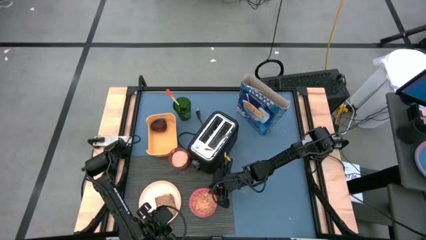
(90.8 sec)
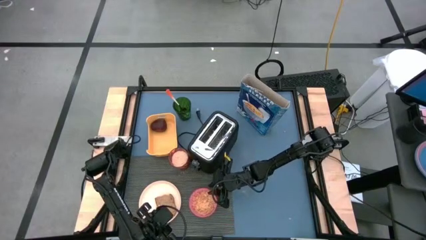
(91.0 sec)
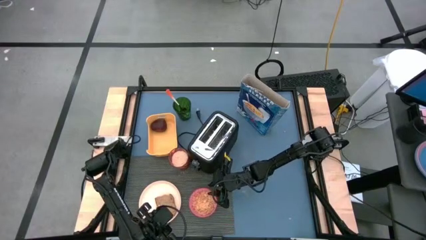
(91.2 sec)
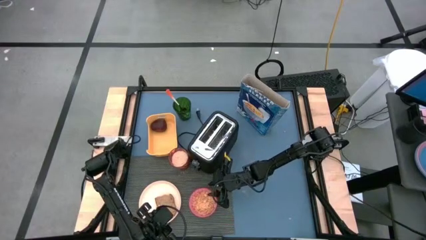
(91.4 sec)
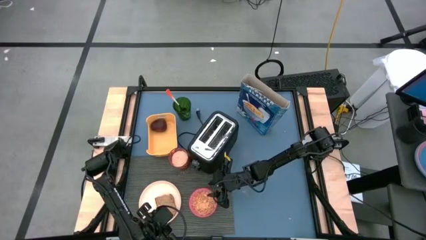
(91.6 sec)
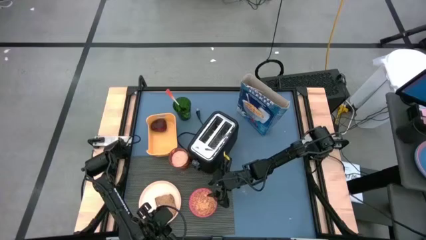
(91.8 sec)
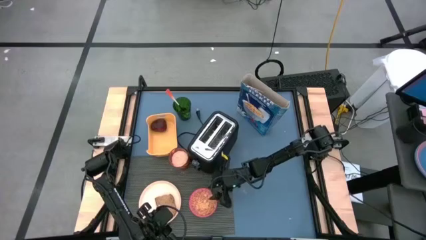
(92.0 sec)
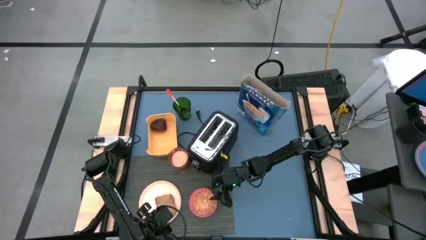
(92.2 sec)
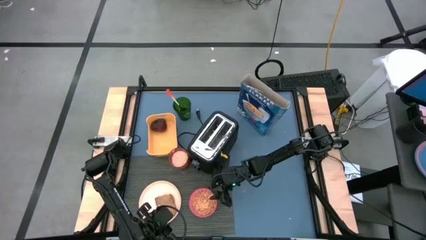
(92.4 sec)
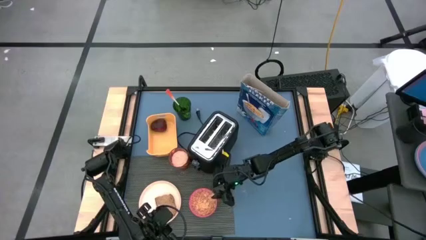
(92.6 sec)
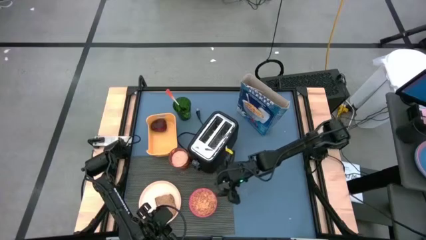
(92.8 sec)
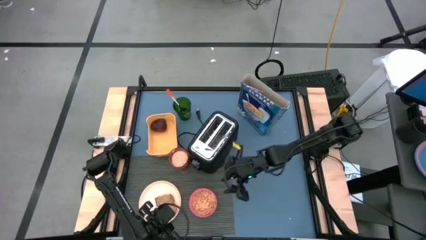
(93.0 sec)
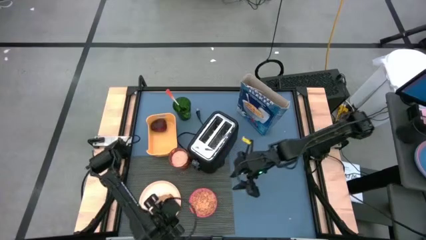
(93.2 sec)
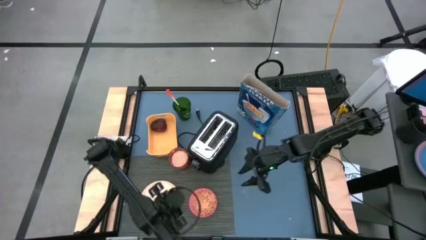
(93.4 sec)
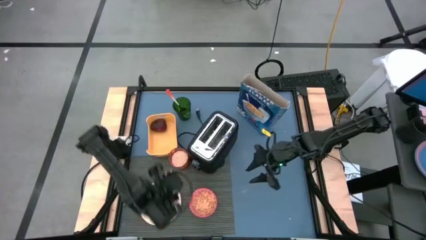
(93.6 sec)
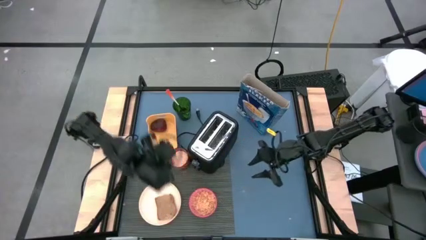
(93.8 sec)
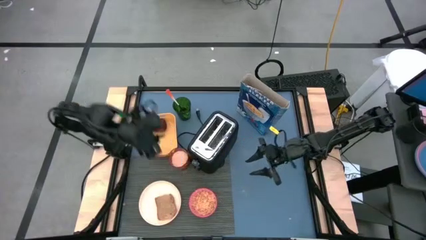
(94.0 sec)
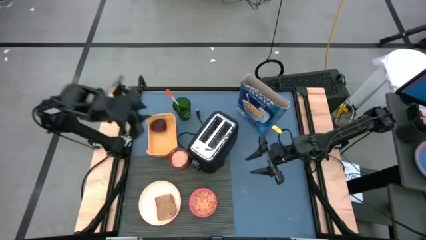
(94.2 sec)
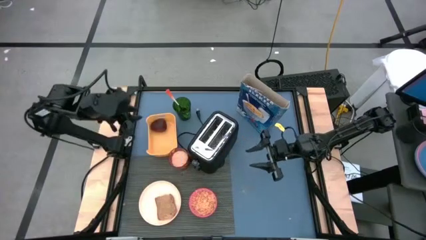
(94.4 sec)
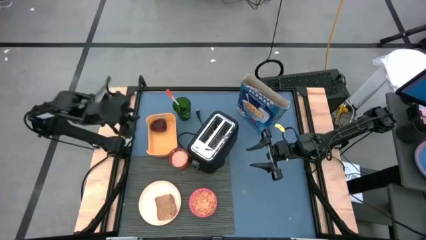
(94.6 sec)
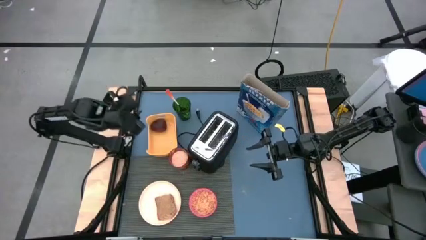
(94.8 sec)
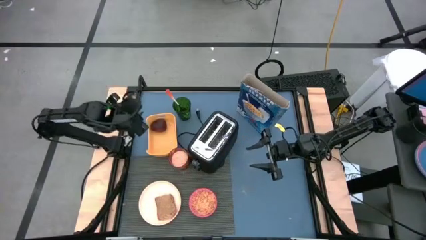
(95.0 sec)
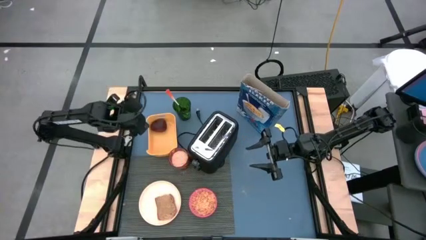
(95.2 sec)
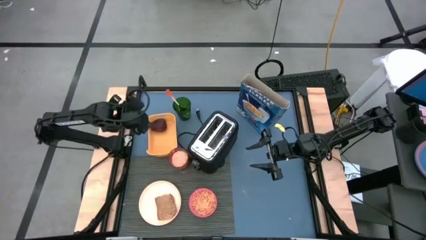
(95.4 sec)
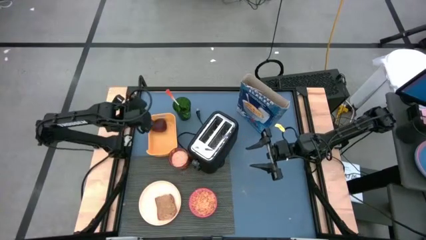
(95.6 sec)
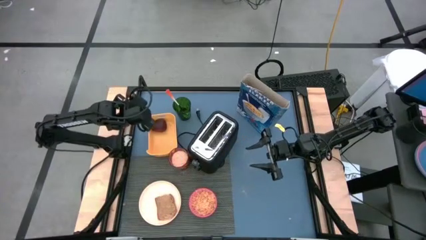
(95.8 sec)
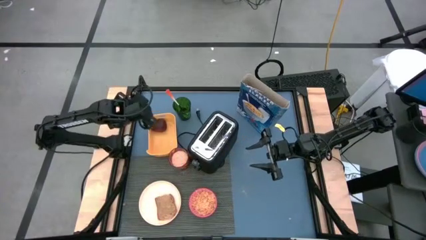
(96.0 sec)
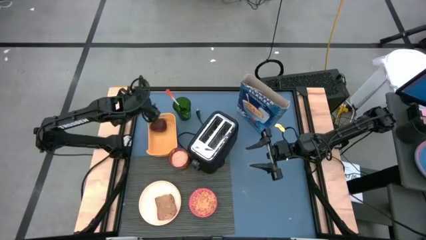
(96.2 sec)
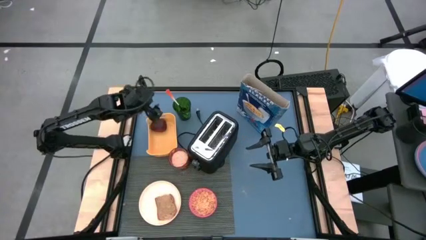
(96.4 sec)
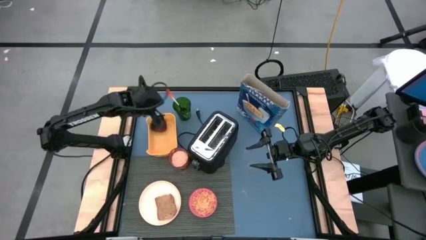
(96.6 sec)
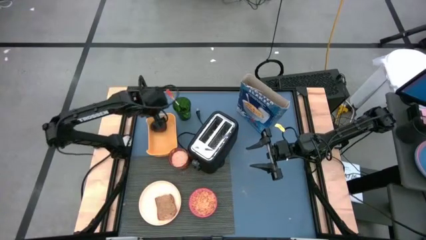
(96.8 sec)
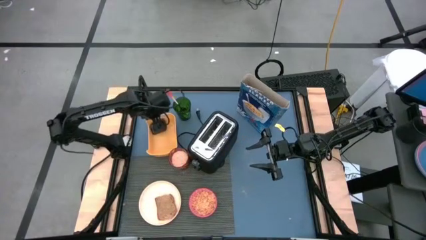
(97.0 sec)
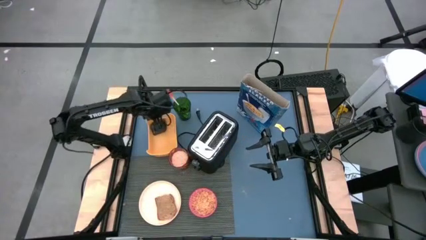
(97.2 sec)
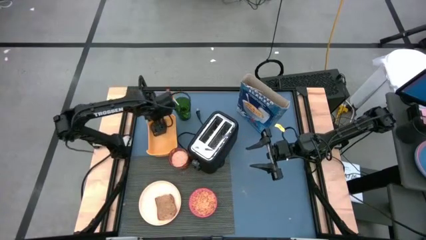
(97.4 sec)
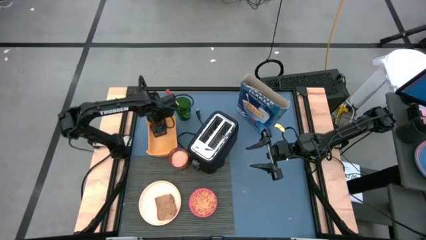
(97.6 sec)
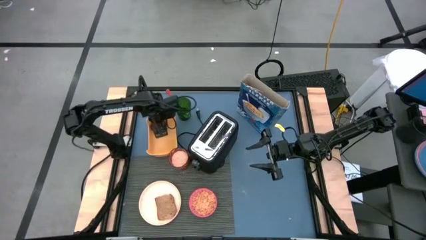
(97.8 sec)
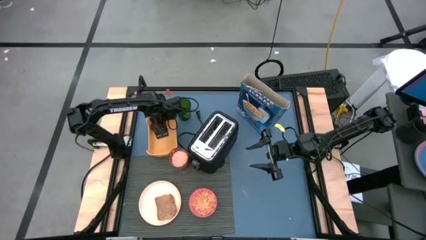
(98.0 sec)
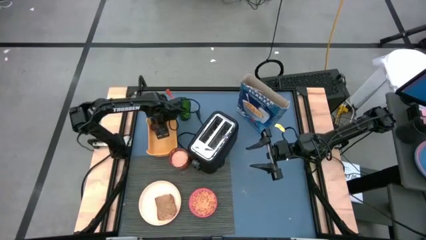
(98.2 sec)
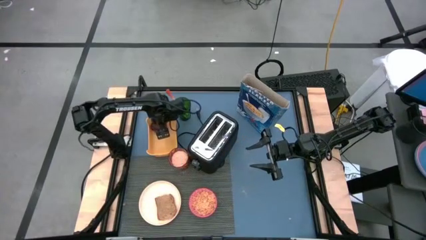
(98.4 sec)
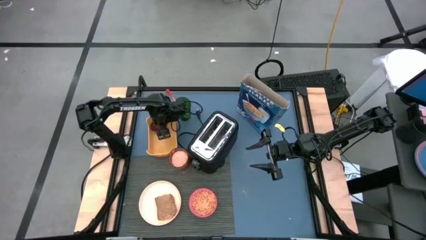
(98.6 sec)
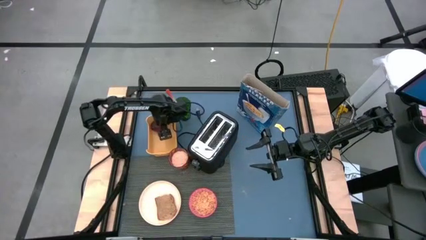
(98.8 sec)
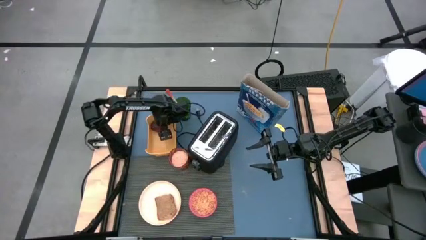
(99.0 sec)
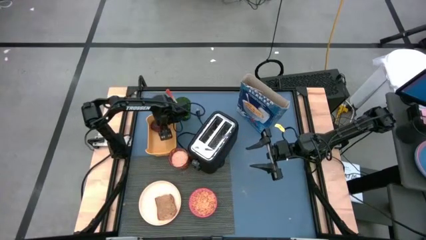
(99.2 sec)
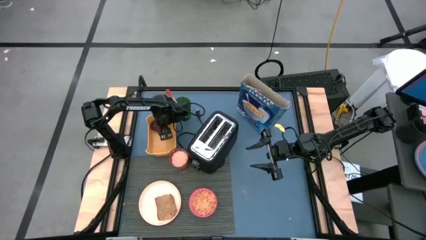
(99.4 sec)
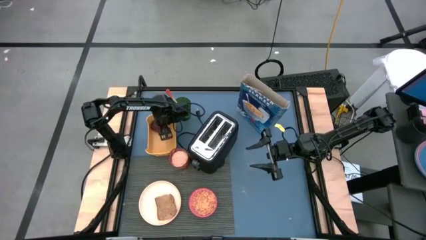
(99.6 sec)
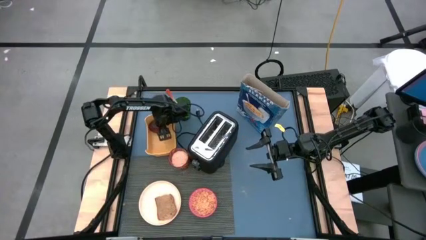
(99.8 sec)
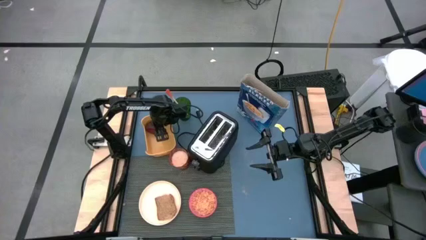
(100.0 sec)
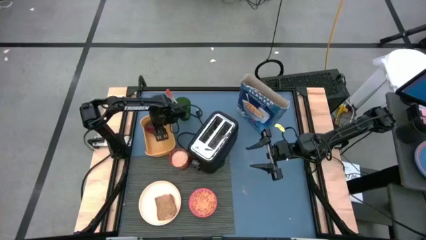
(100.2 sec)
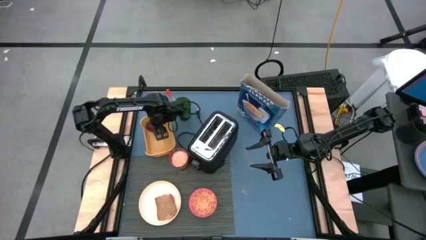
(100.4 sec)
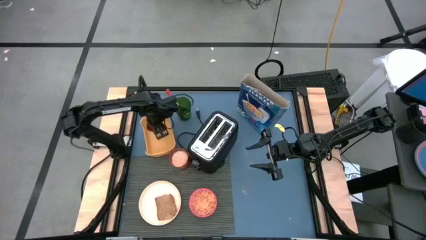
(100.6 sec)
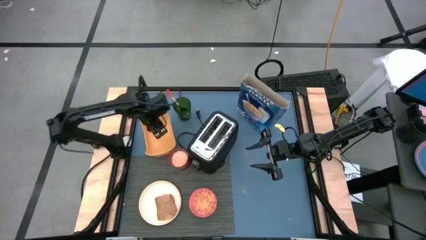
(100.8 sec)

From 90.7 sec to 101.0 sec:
Task: Arrange a breakfast setting
Put the red apple on the gray tablemat to the top of the light orange plate

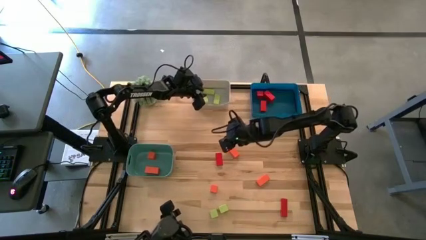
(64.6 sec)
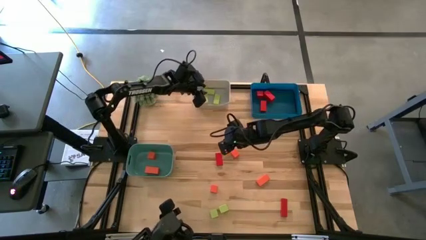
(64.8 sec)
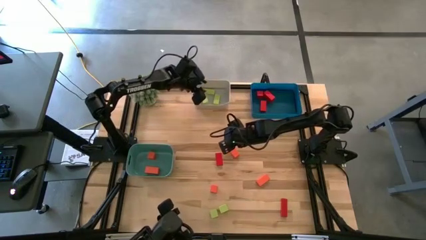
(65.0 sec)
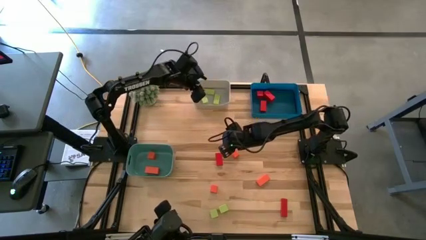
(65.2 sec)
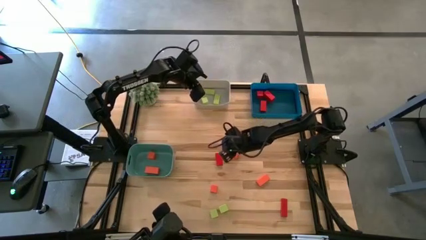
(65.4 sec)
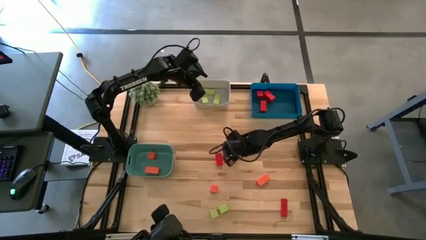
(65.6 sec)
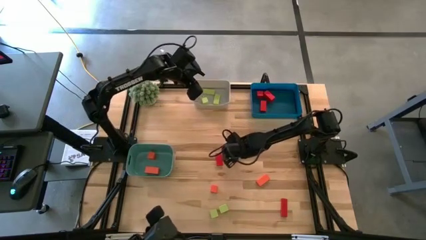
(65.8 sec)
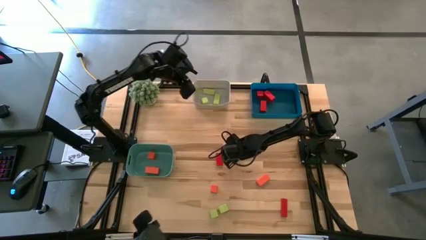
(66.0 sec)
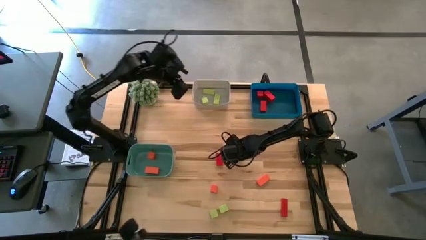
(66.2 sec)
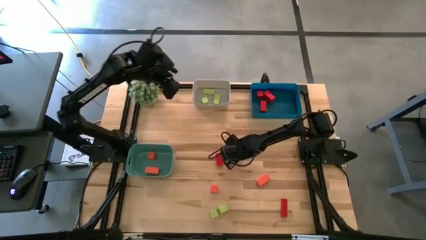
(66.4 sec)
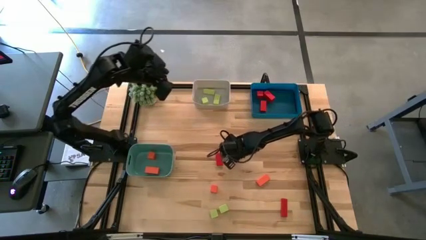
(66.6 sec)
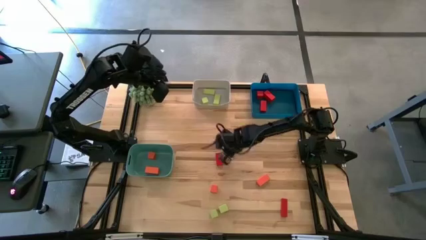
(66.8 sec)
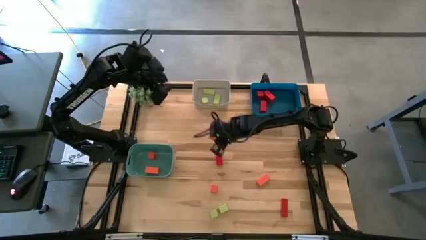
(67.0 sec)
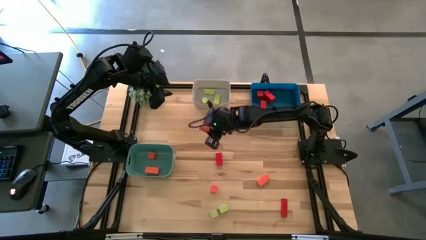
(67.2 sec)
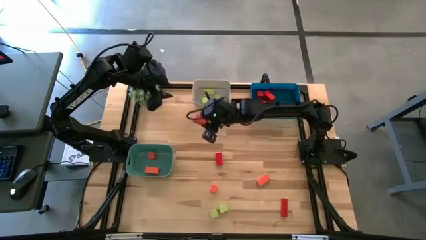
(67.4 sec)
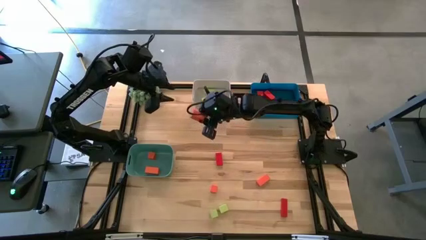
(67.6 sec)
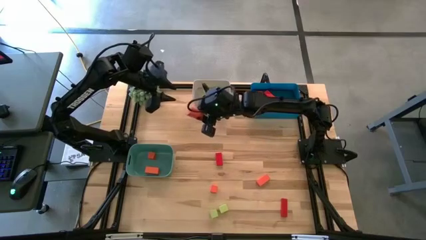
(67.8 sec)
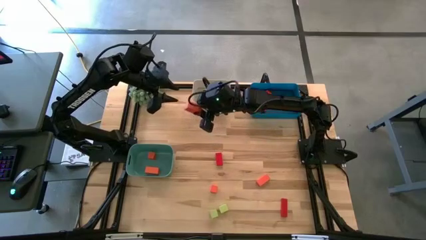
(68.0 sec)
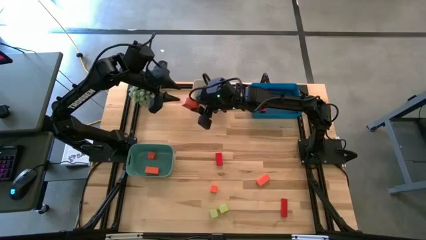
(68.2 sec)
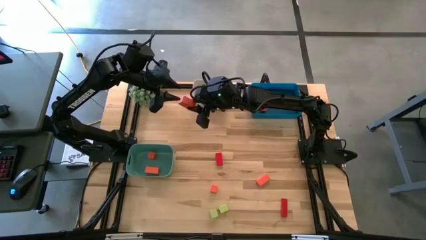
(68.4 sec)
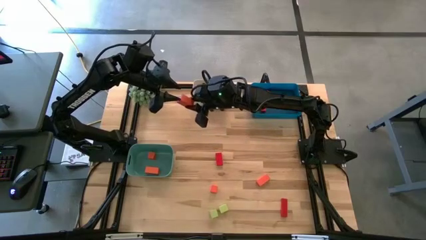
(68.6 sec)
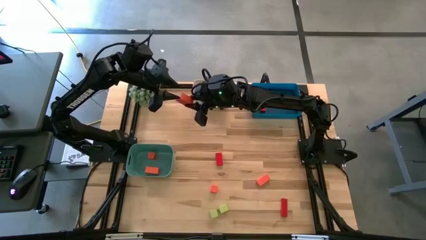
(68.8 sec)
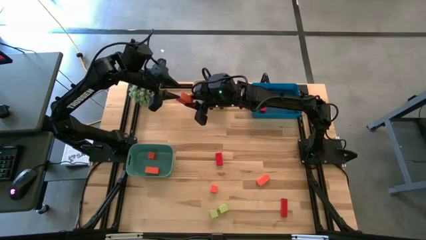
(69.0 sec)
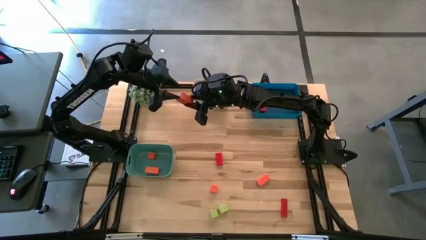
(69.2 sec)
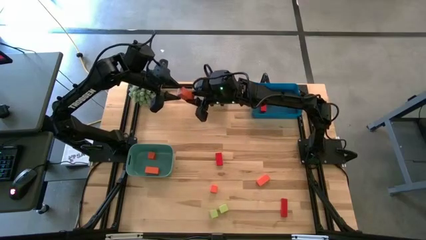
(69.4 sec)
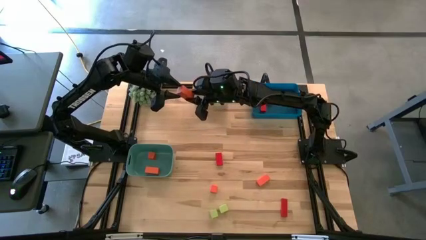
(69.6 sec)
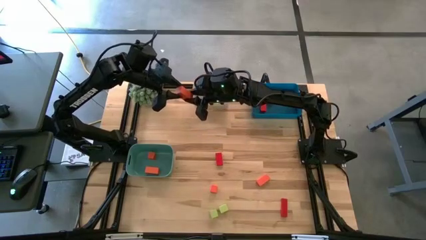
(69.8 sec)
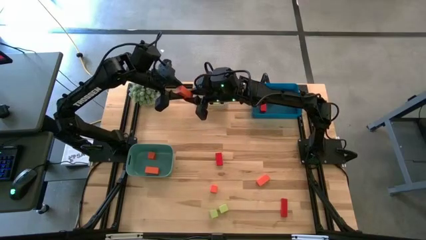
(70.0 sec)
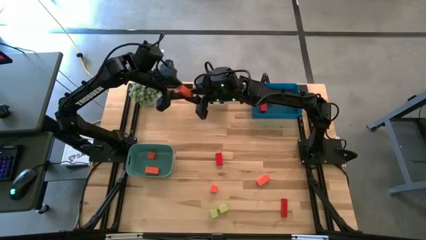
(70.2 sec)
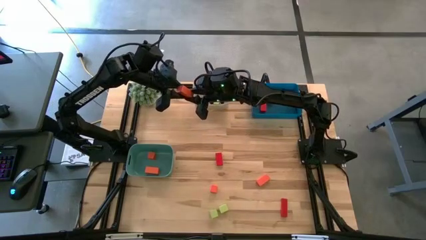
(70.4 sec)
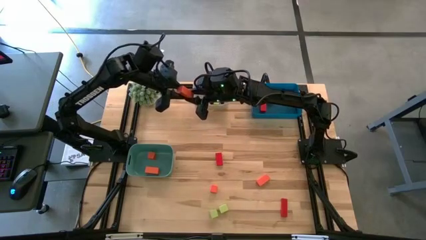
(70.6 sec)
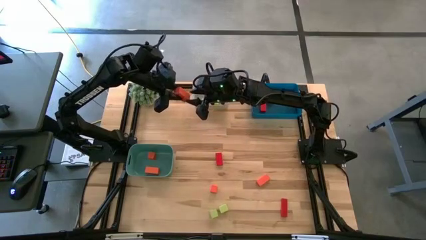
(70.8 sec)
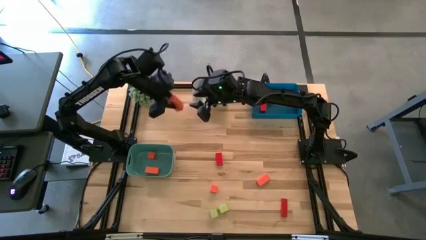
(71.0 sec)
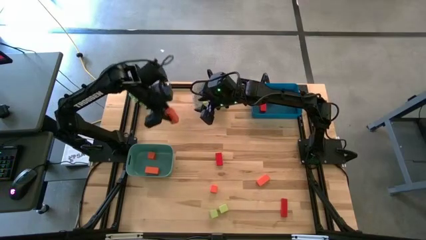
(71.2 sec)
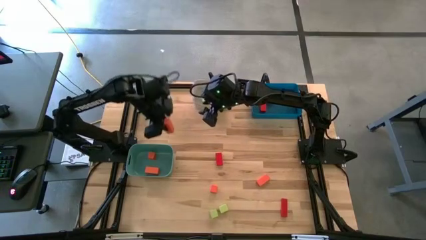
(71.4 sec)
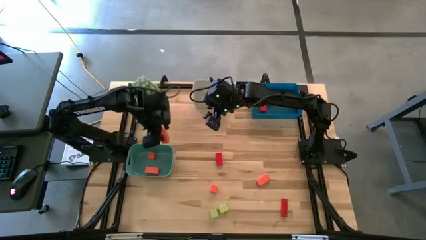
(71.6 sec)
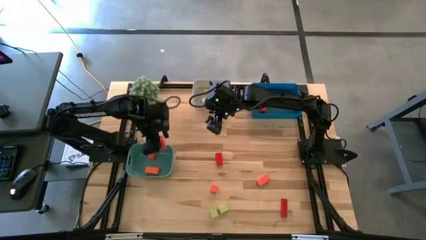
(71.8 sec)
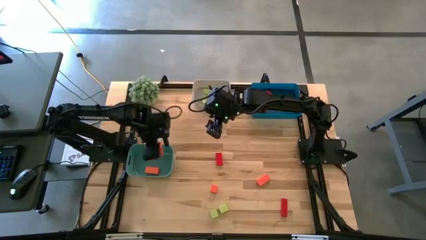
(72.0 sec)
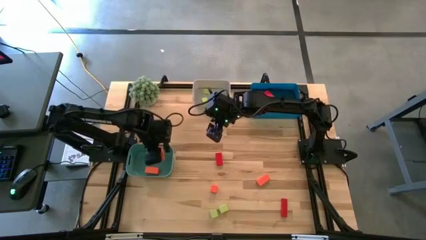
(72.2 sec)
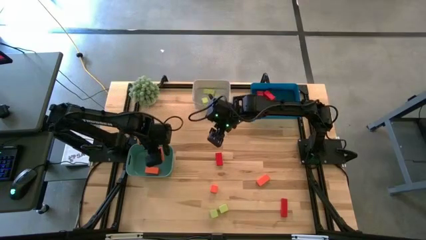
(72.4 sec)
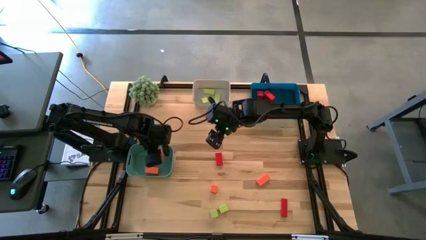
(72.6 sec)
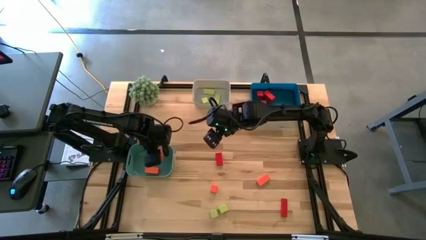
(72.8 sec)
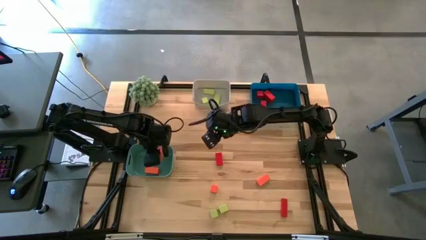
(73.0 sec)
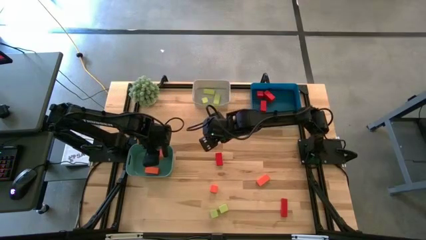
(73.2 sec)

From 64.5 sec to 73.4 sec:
Task: Sort & place blocks by color
Put the orange block into the green bin
